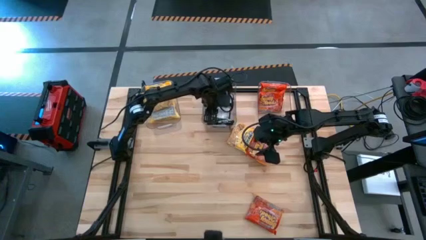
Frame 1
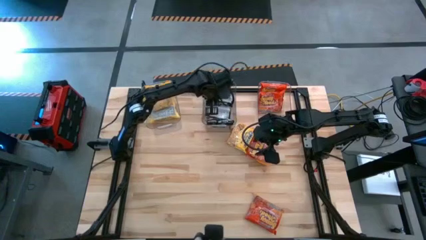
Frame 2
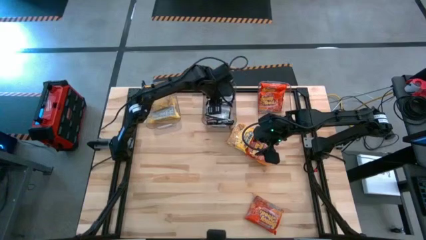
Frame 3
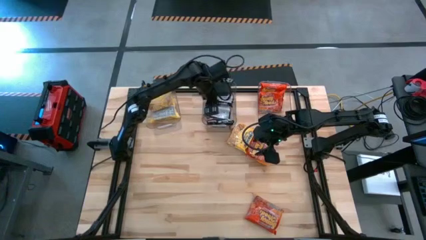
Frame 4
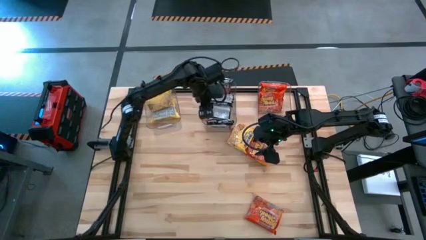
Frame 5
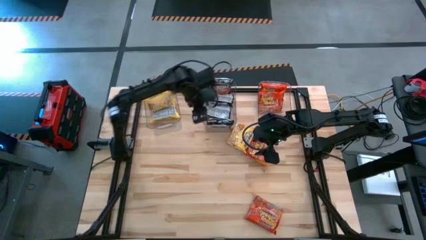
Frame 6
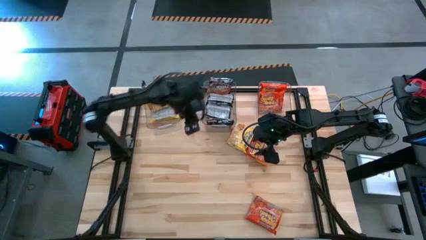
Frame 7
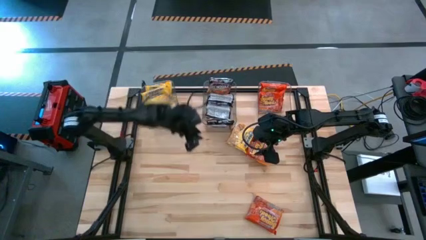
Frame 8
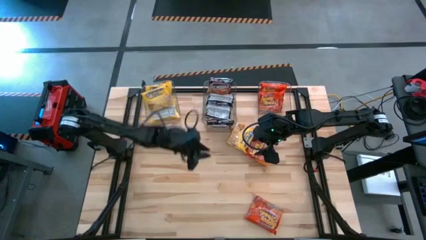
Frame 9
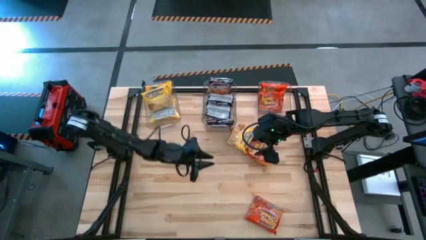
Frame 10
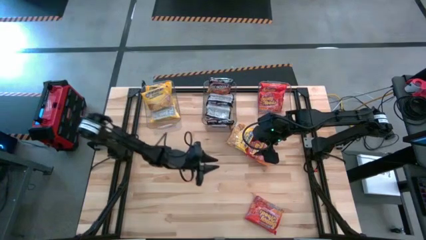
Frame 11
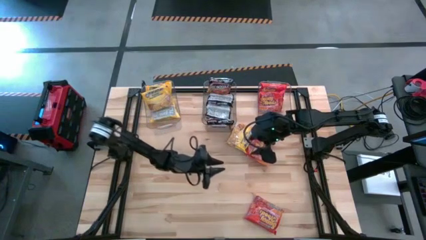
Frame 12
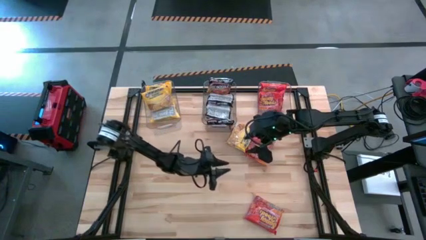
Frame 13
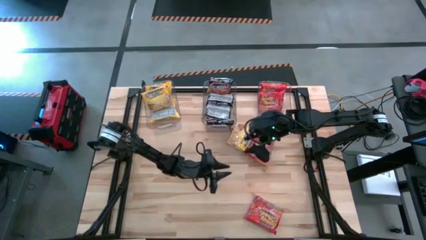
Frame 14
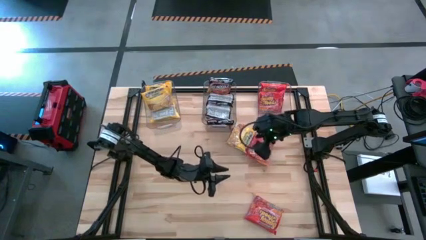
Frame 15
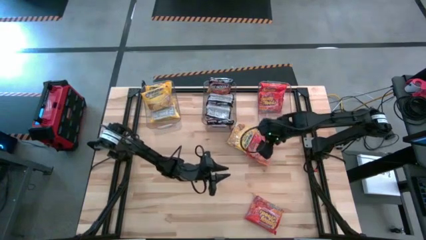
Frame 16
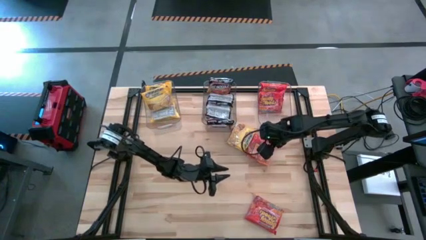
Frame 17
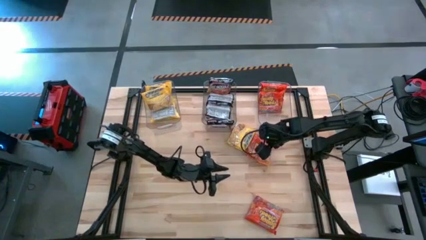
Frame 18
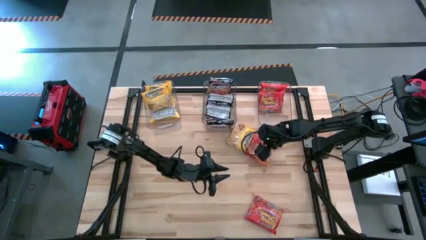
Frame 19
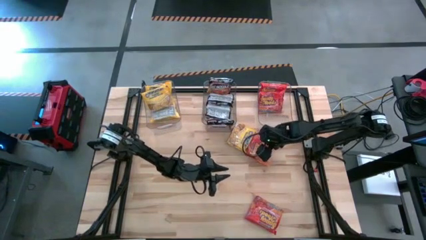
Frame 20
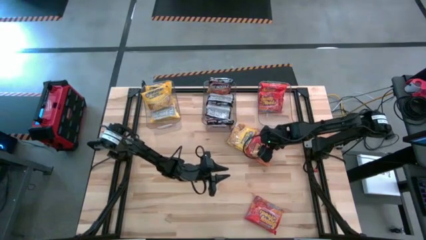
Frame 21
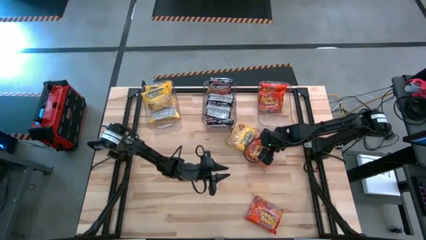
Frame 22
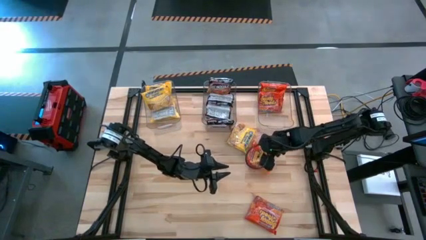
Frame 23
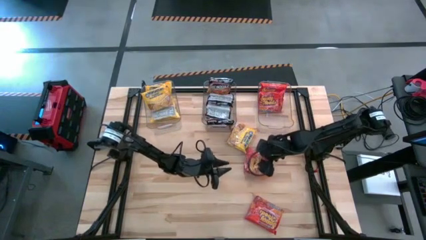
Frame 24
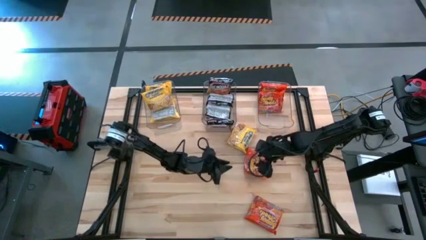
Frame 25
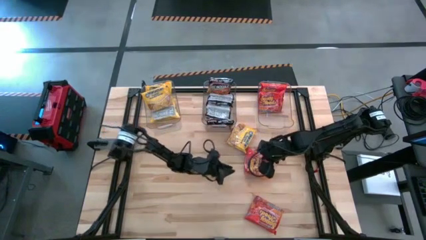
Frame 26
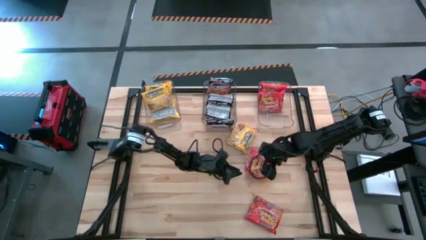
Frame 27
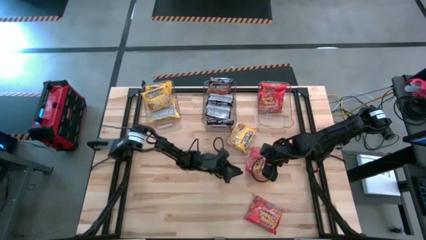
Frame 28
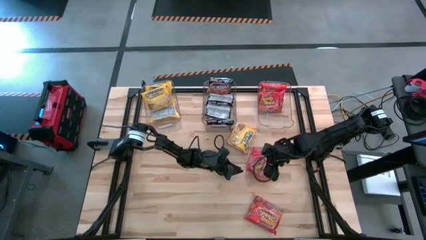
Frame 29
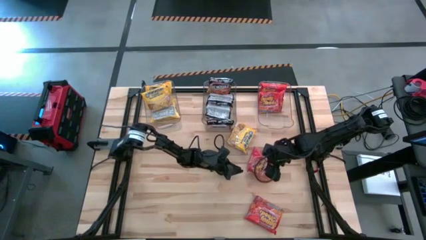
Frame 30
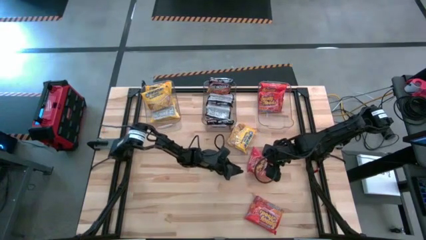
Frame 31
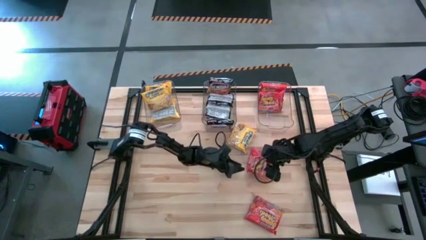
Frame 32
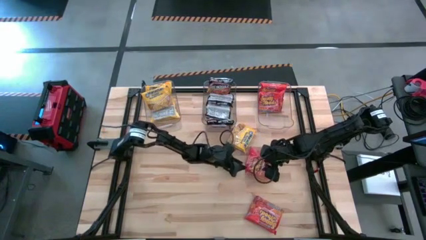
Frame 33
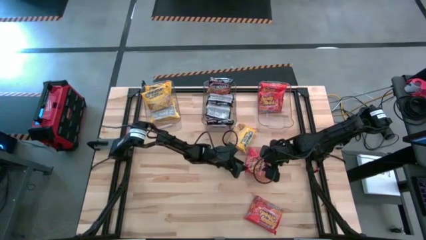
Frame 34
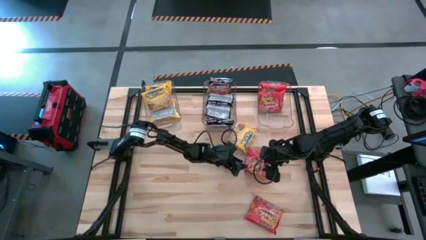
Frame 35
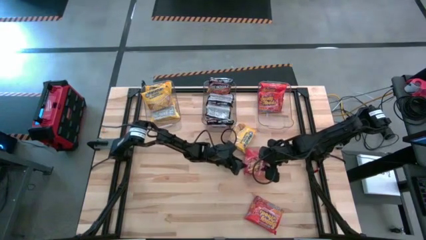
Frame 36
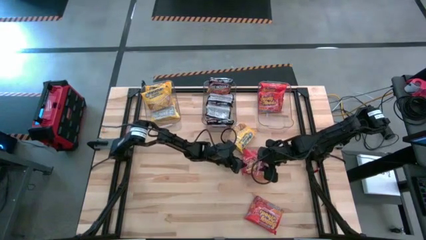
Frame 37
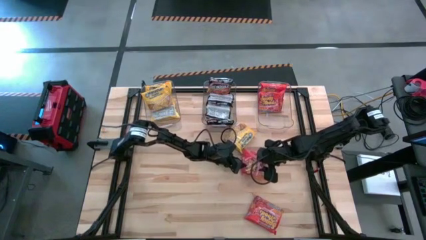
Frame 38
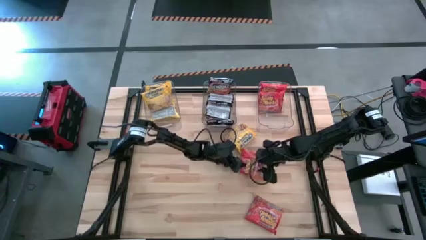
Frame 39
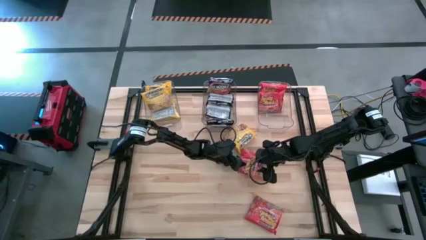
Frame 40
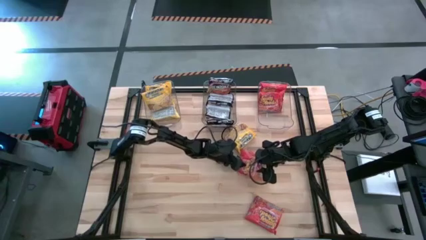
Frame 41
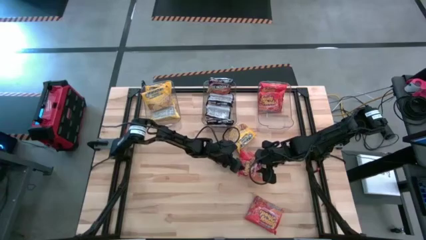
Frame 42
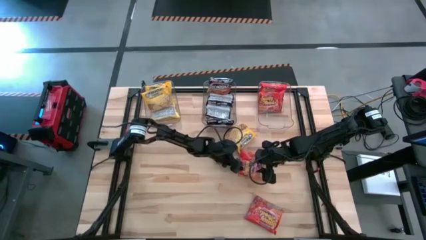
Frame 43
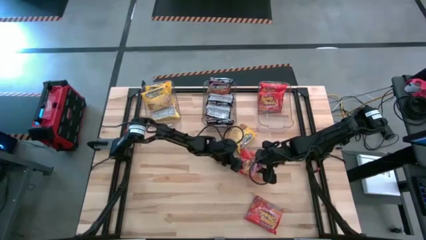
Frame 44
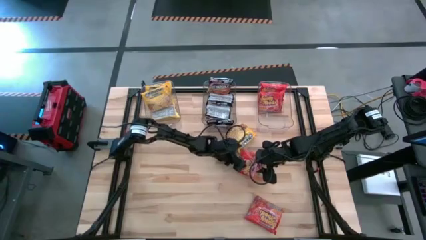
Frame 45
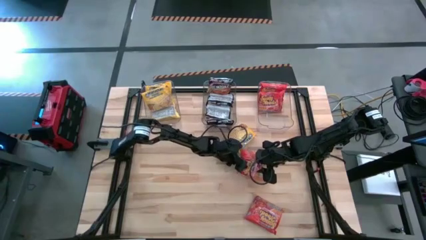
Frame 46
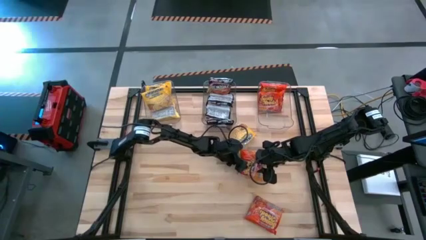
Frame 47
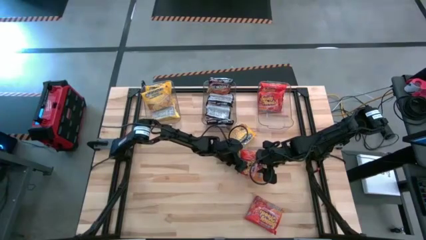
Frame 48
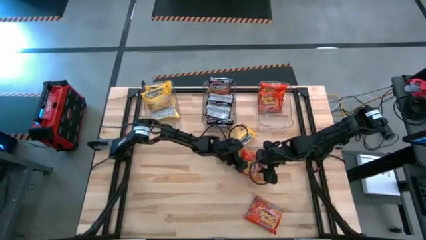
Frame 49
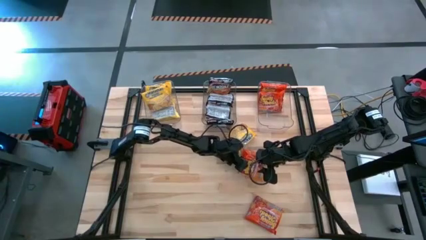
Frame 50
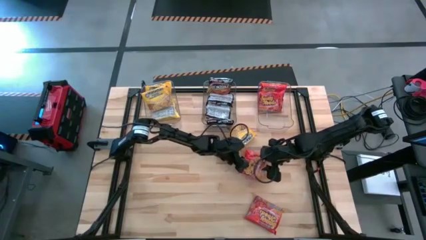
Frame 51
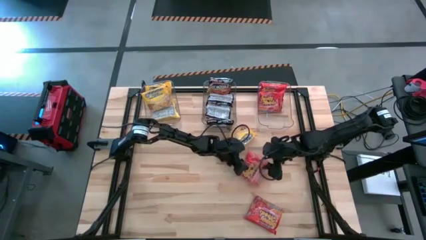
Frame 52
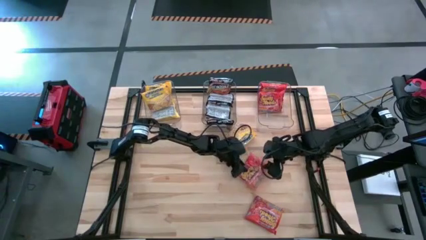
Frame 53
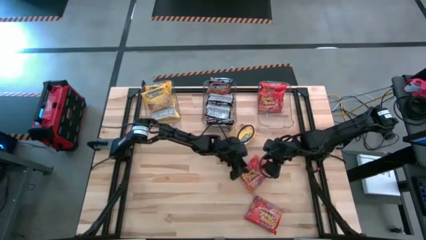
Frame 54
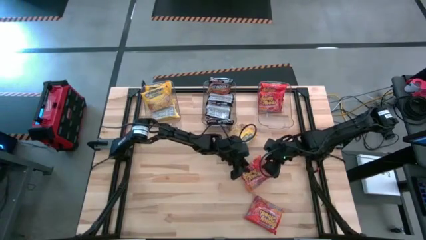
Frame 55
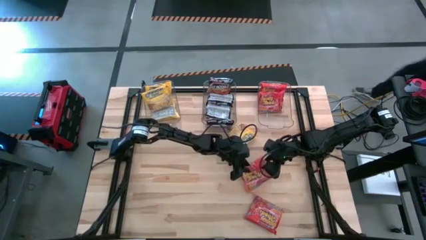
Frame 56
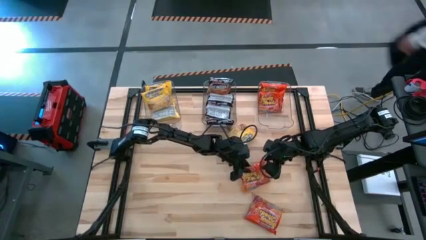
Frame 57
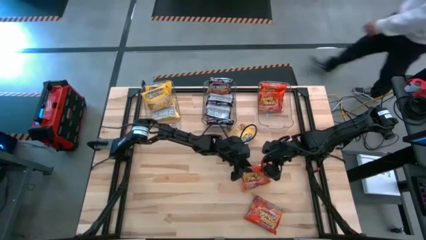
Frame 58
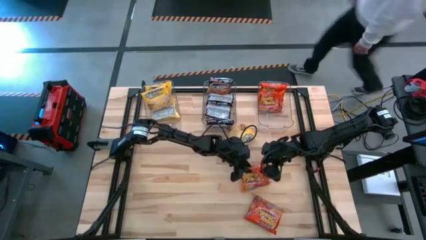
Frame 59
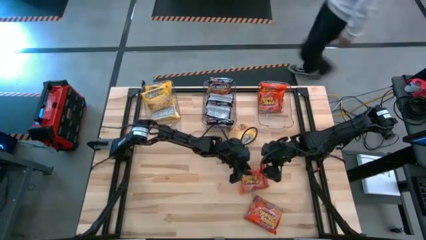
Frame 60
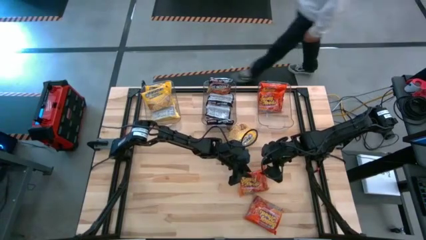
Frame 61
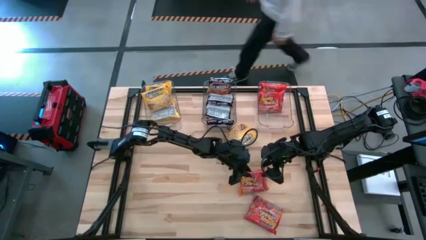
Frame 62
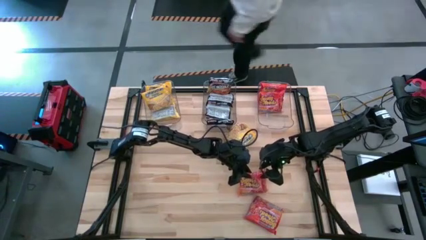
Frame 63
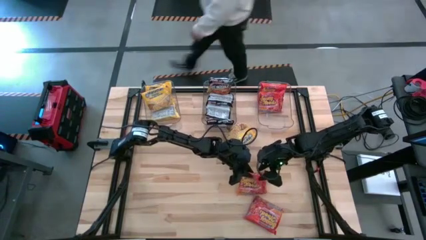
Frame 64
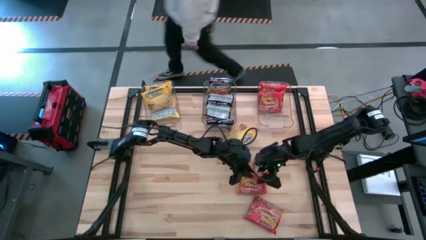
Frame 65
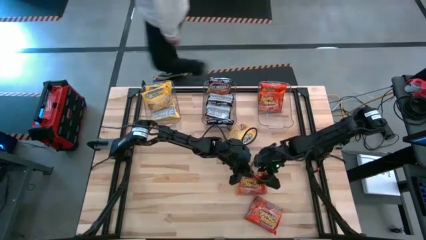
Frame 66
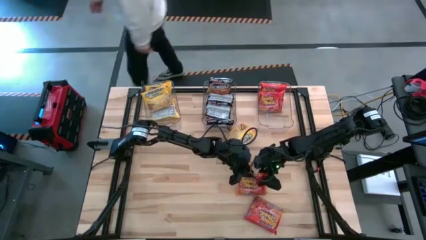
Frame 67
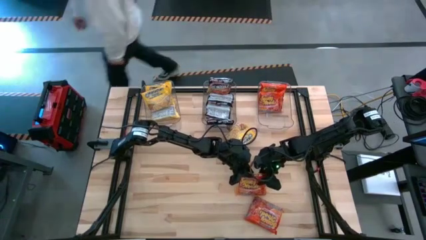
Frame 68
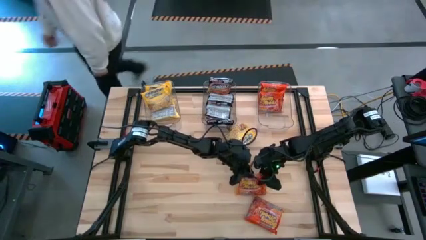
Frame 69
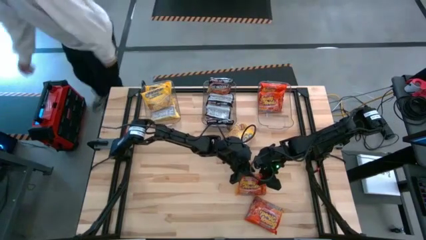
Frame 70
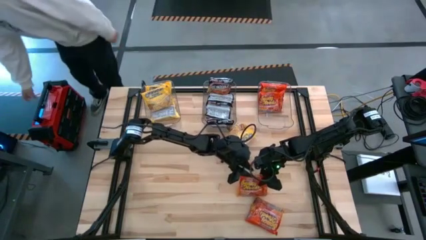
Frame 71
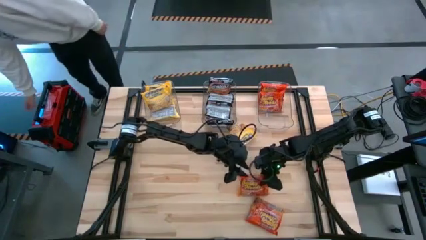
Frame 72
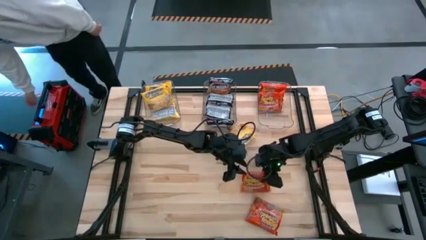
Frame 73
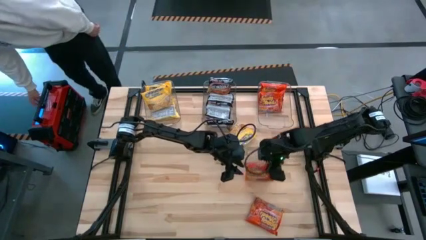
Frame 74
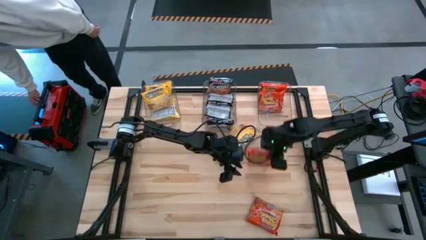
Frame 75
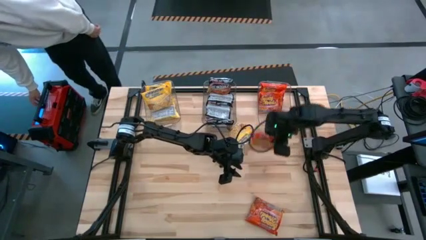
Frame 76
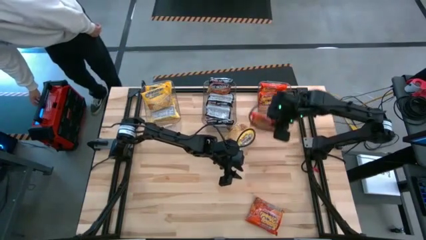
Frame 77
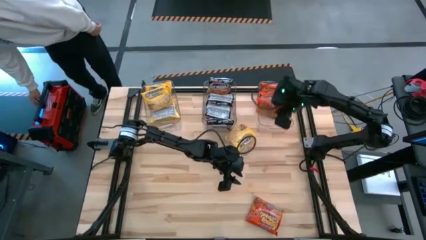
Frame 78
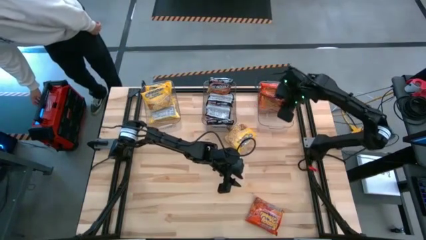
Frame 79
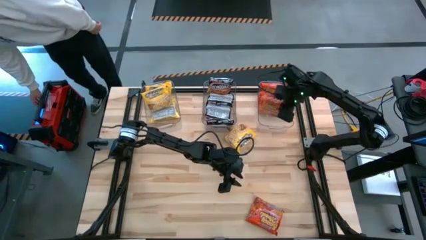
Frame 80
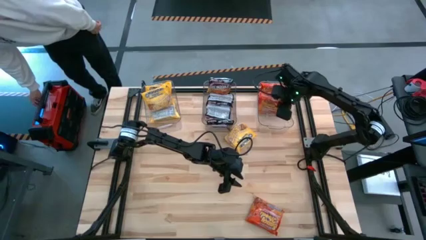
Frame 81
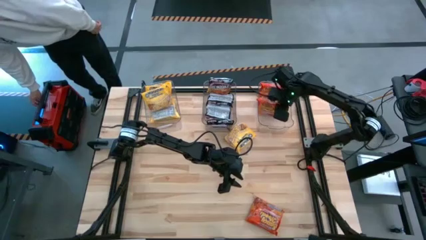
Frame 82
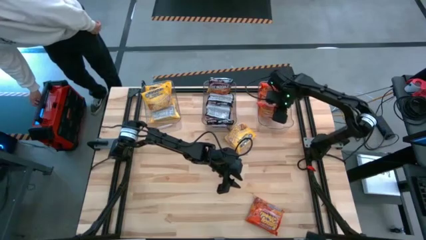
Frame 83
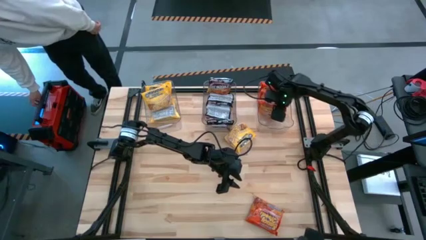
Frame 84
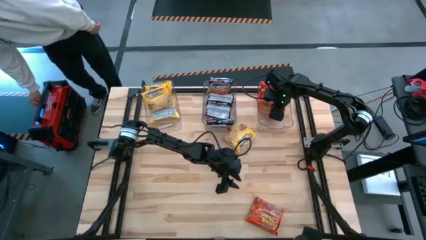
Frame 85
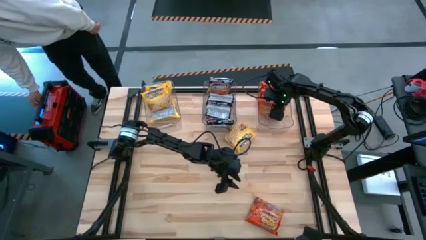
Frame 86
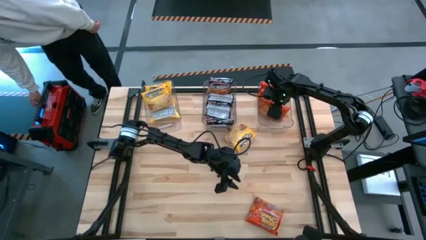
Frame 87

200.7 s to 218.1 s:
Task: Sort Maruchan noodles
Put the orange noodle pack into the right transparent bin
